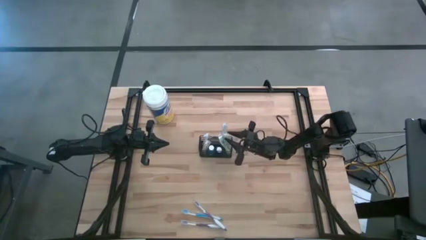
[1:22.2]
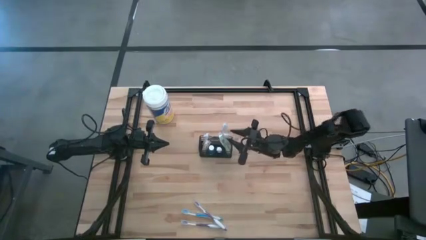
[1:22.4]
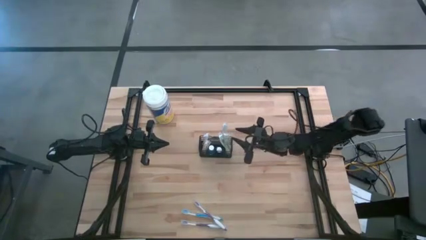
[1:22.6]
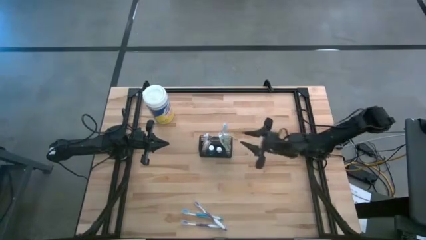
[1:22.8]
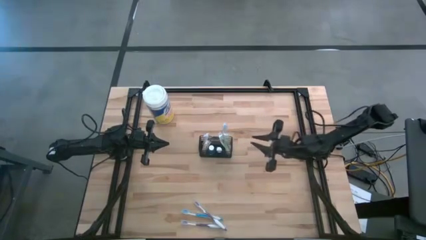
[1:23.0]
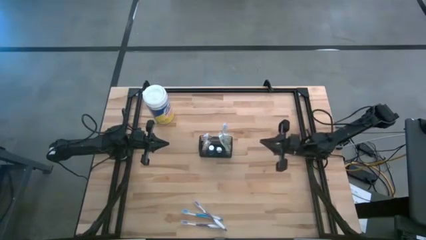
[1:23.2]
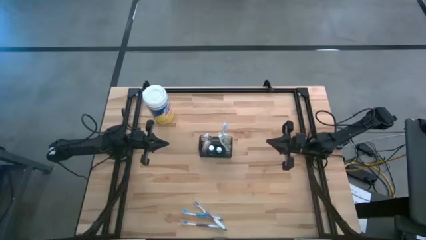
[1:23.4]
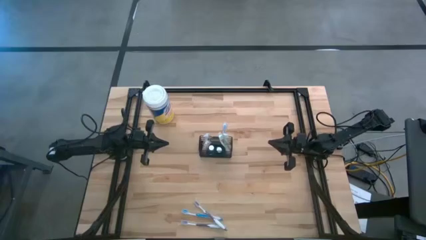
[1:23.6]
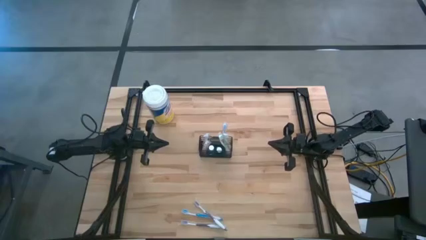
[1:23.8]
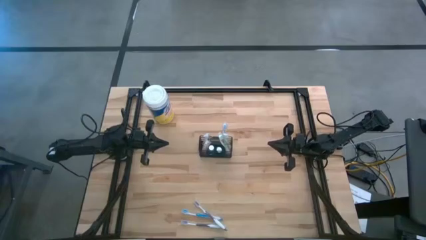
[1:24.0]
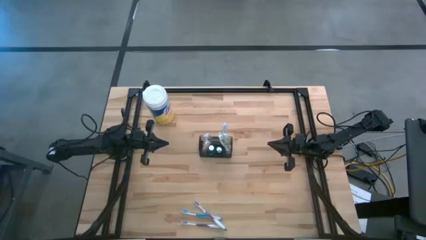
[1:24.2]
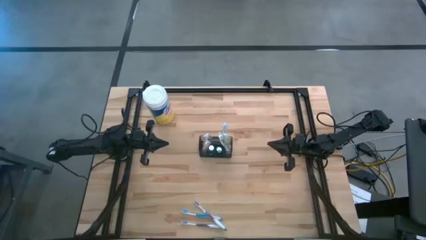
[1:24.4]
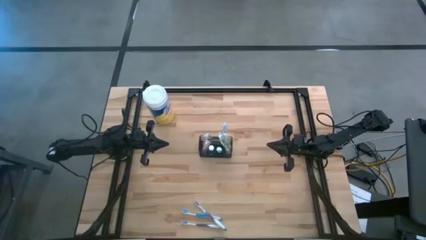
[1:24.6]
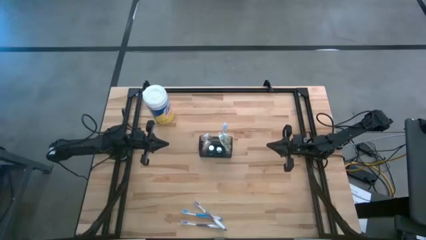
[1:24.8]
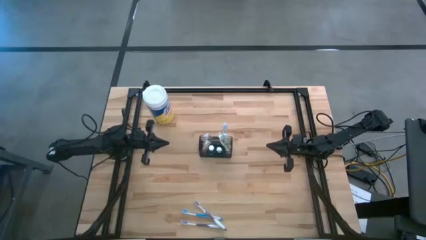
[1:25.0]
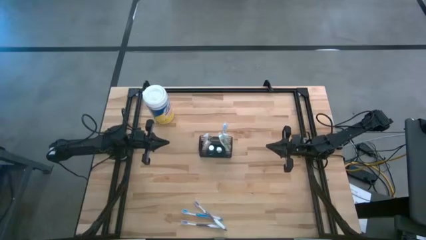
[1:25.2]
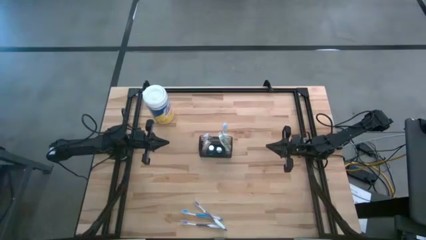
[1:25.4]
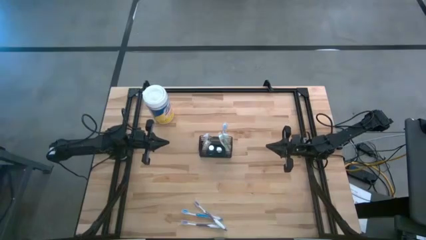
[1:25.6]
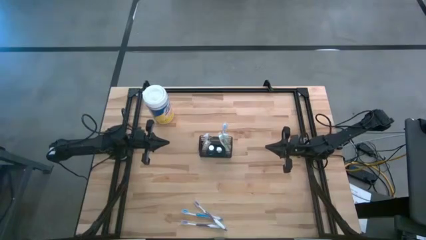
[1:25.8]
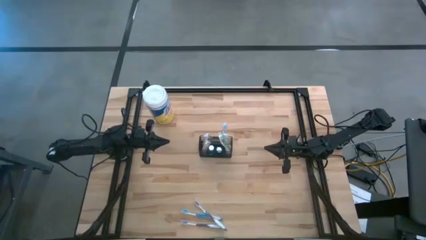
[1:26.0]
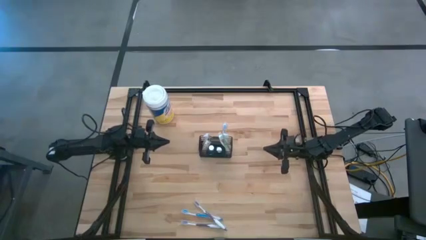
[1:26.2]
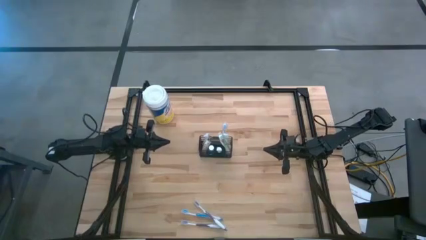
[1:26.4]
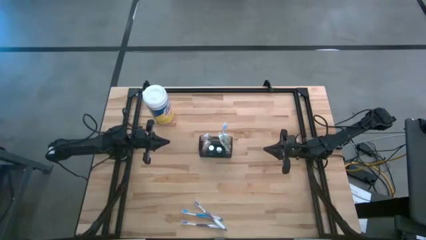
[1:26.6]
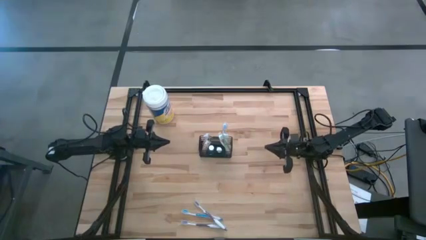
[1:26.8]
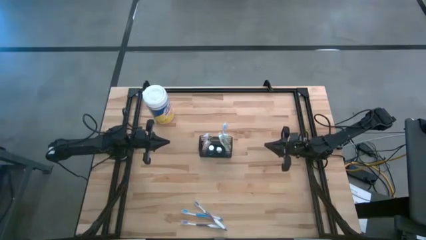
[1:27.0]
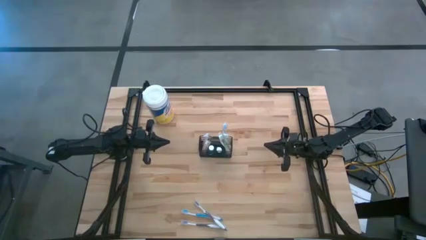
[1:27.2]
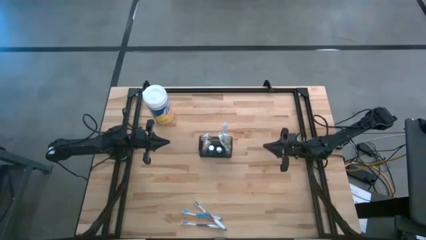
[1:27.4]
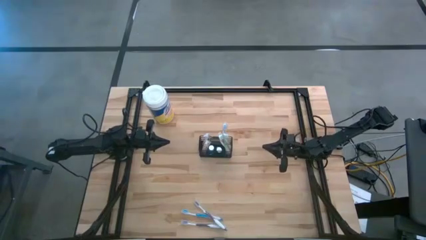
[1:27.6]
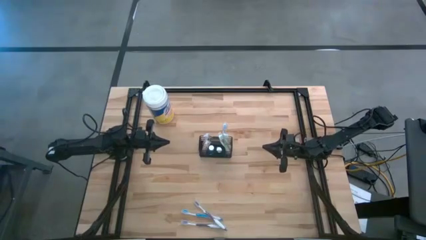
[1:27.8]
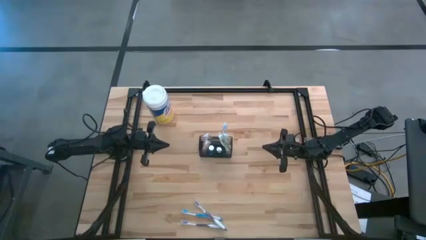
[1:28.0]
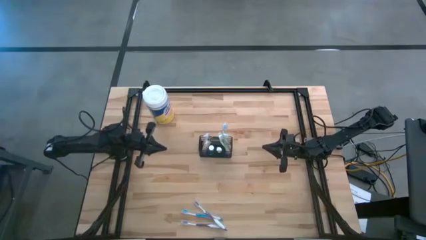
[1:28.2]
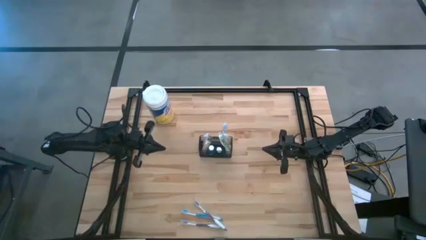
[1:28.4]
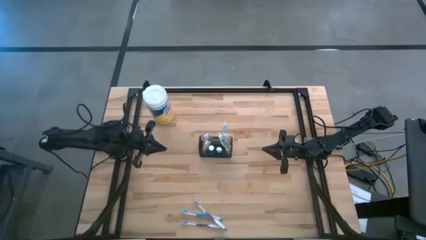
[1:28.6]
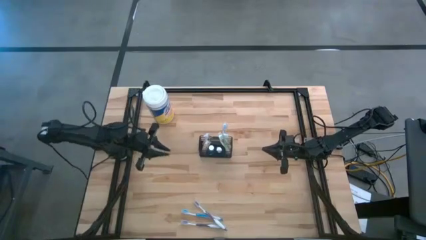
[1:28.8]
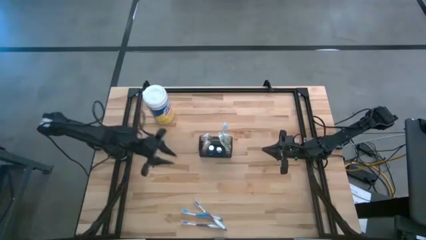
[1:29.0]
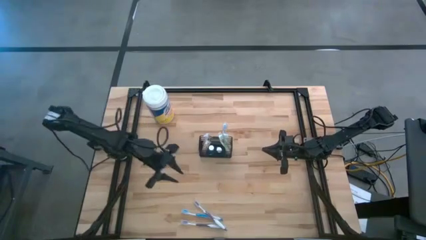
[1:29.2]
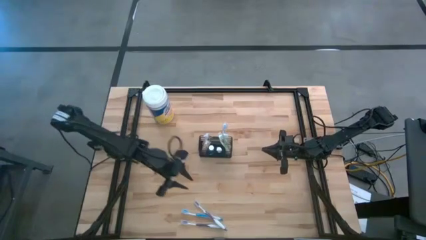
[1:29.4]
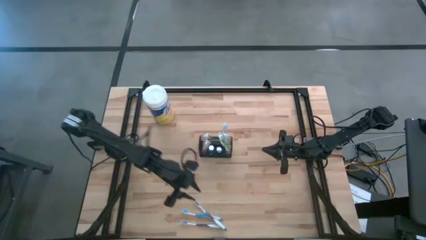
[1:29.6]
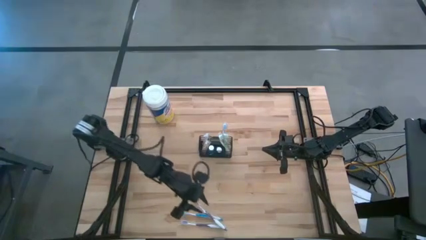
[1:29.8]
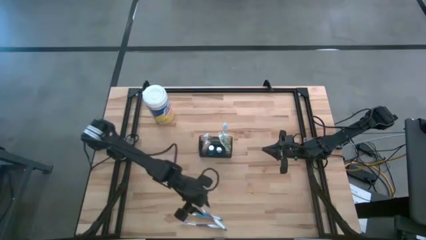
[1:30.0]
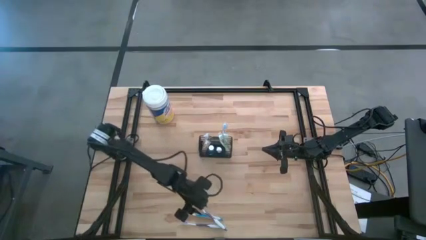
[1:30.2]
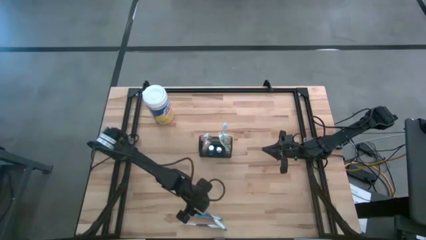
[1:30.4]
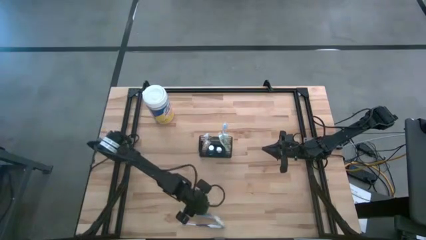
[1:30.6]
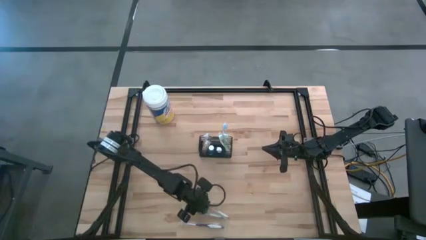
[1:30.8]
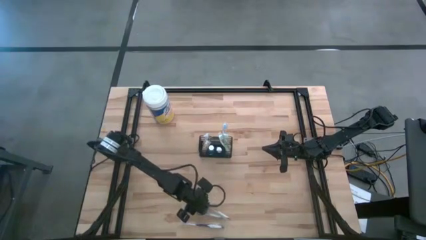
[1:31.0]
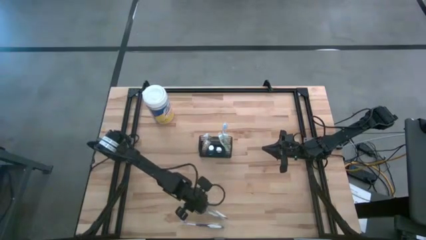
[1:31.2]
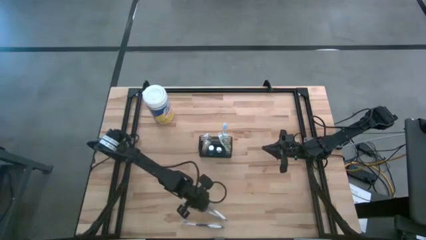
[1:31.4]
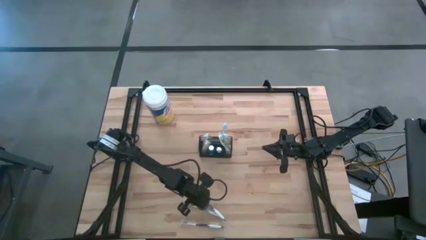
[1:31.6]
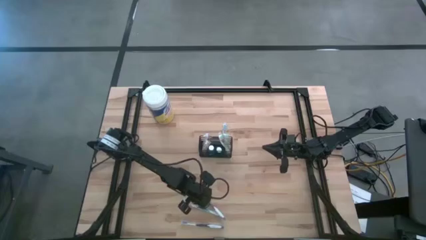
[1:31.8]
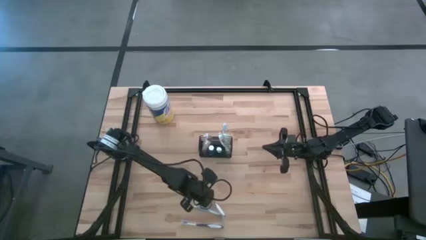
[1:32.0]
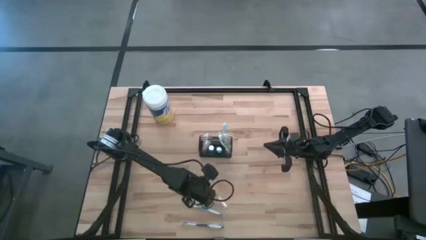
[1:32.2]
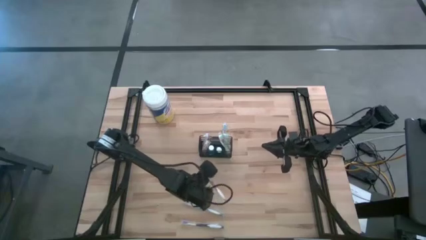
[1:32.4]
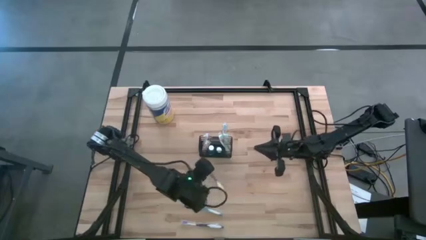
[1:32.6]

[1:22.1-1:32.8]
Task: Pick & Place toothbrushing station
Put the top purple toothbrush into the wire organizer

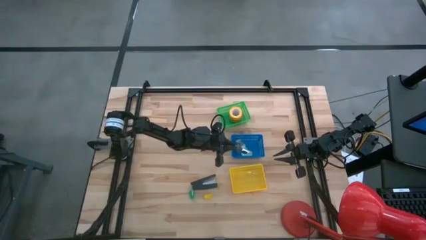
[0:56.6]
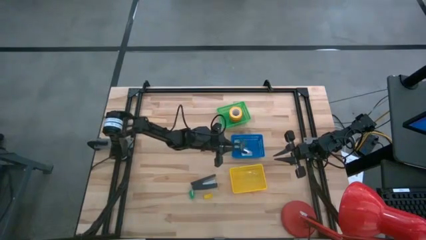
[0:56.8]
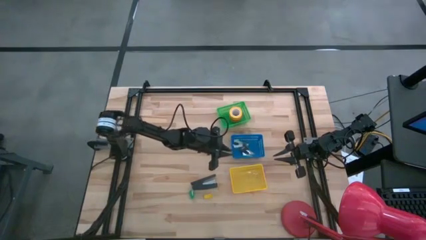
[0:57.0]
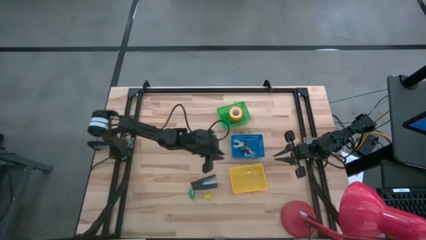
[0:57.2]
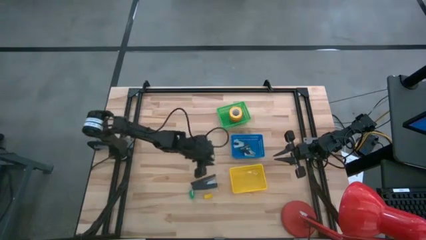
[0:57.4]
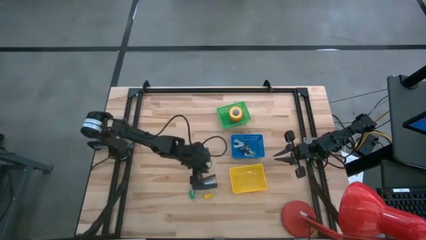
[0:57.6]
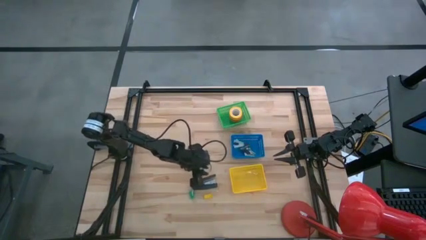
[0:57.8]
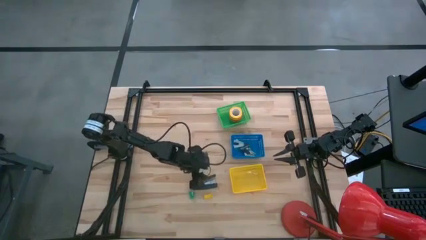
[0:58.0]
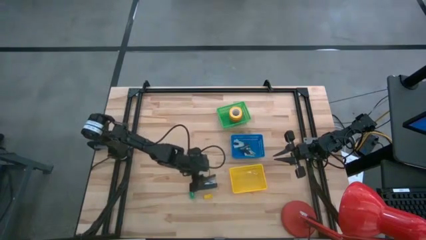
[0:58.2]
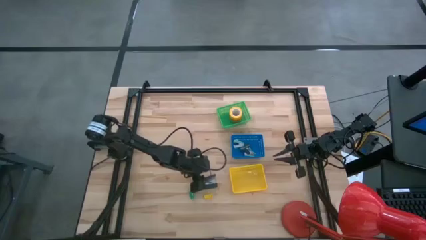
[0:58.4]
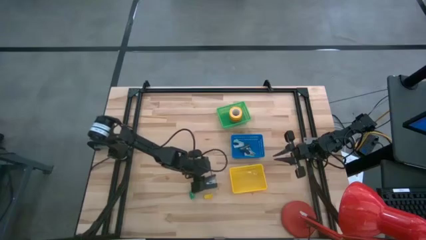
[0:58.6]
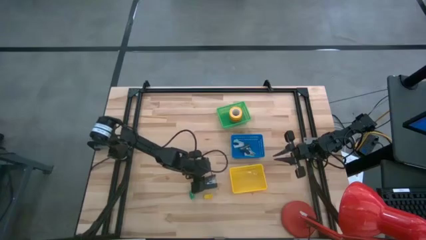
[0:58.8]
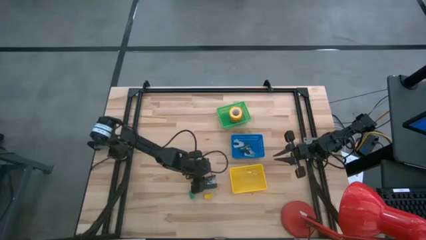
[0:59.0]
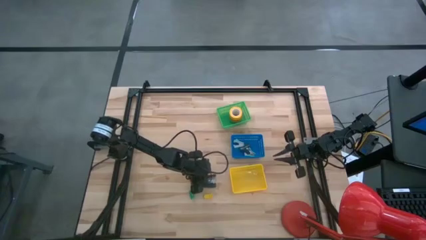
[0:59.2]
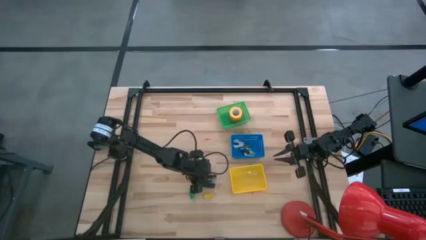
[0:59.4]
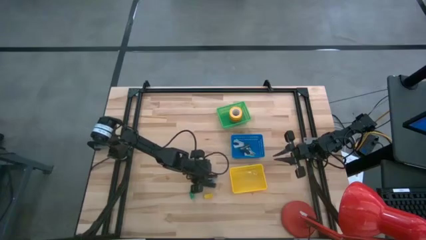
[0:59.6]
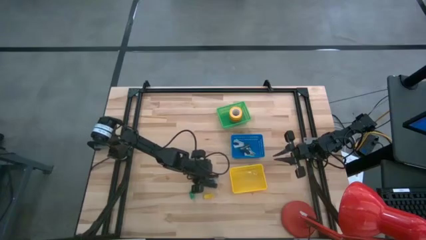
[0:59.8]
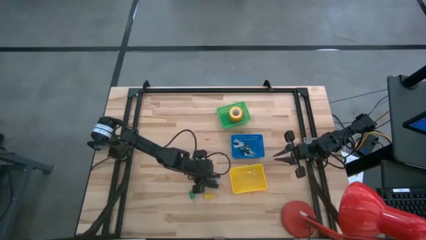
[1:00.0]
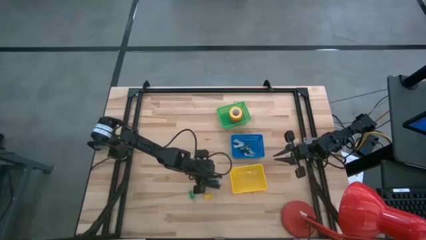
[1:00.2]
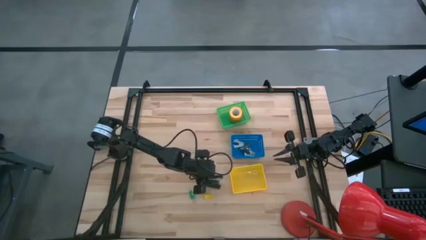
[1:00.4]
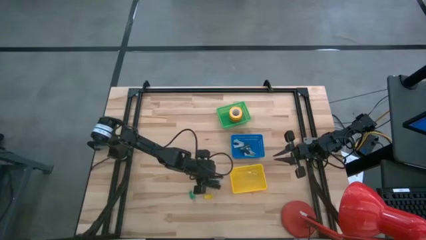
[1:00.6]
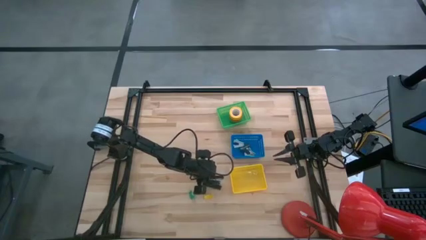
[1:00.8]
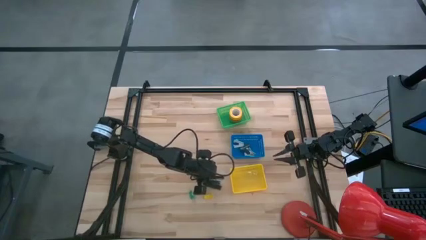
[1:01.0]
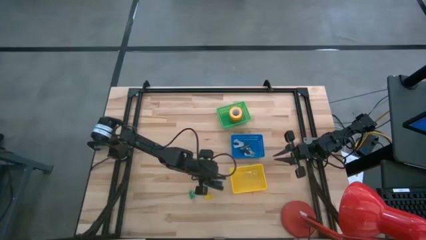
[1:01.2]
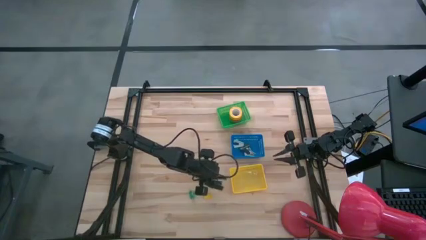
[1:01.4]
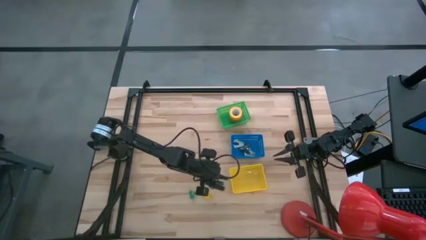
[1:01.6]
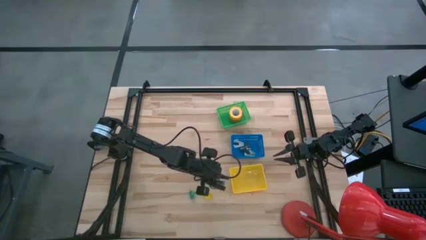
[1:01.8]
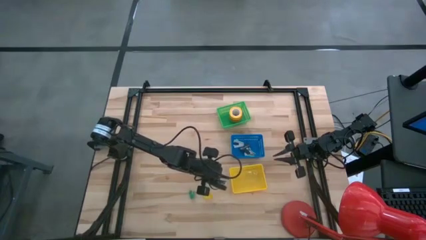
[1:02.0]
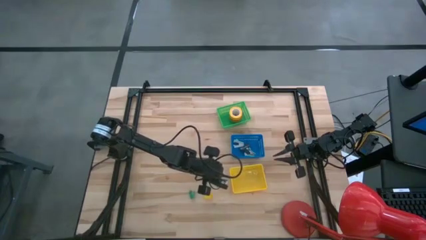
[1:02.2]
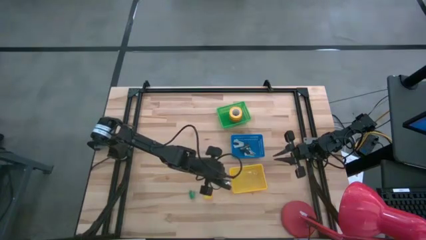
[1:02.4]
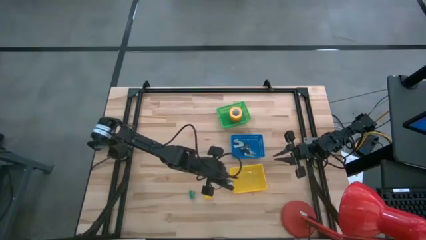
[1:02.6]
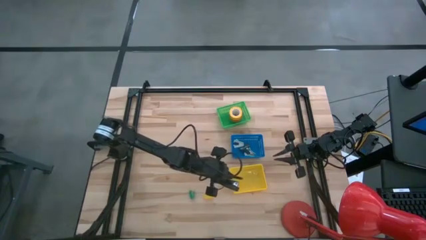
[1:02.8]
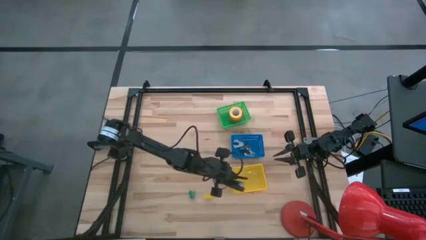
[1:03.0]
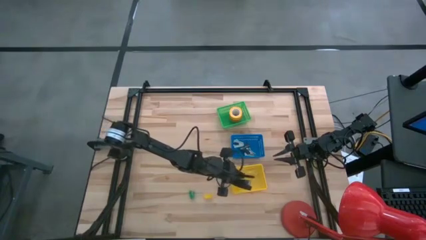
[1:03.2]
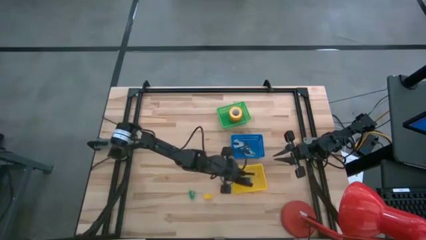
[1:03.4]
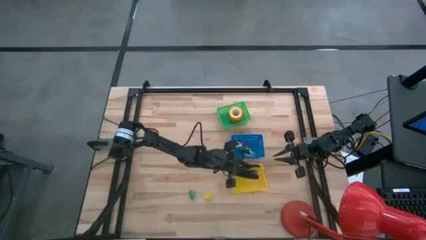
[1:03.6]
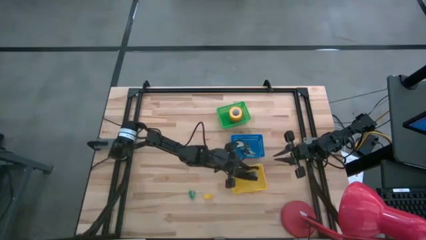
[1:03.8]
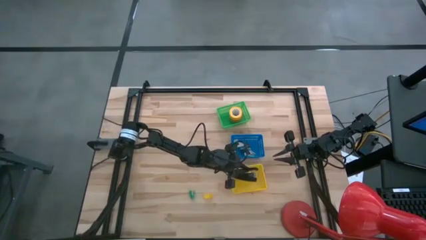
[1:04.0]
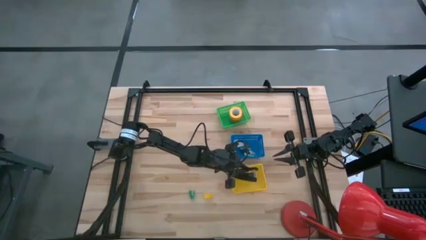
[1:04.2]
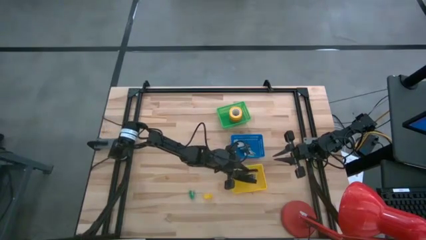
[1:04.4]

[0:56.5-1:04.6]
Task: Pick and place Stapler, Stapler remover, tape
Put the black stapler into the yellow bin
